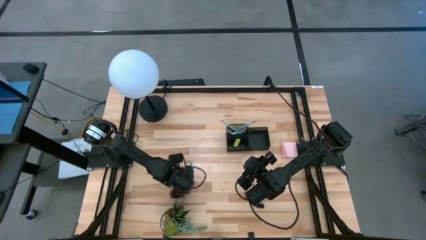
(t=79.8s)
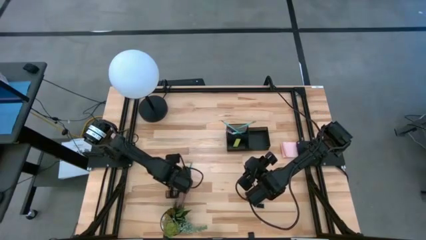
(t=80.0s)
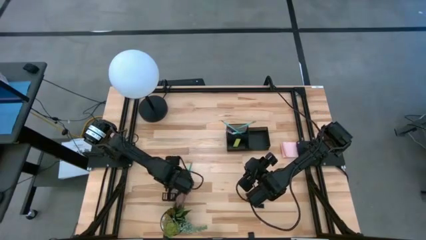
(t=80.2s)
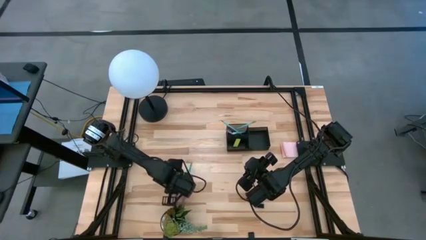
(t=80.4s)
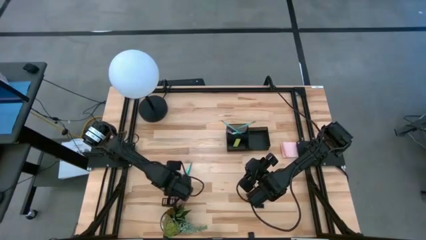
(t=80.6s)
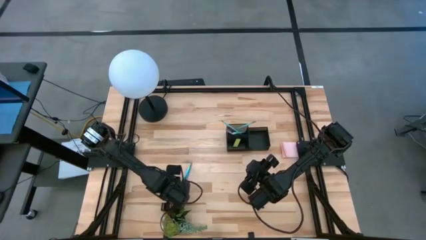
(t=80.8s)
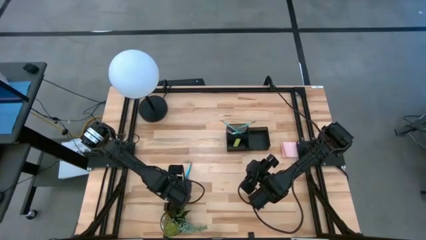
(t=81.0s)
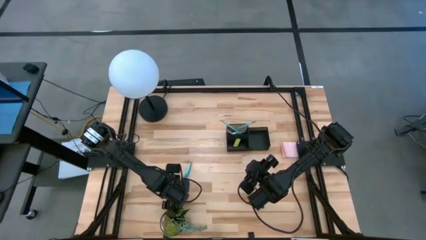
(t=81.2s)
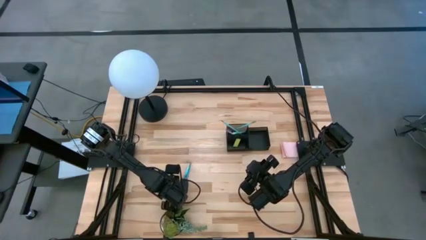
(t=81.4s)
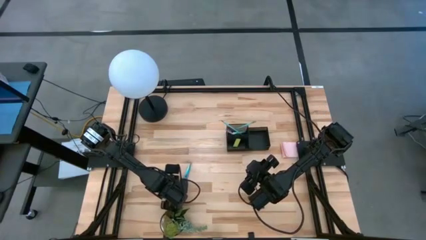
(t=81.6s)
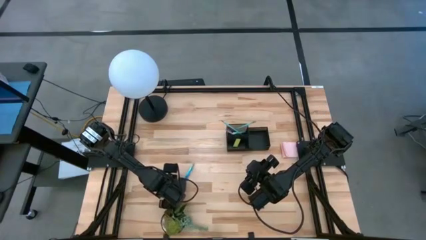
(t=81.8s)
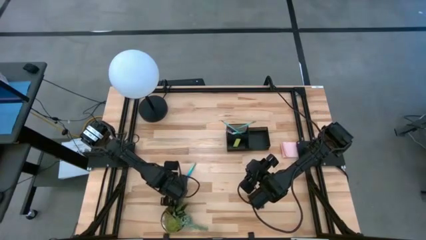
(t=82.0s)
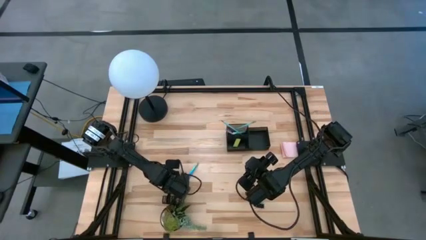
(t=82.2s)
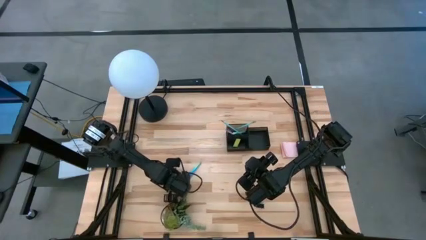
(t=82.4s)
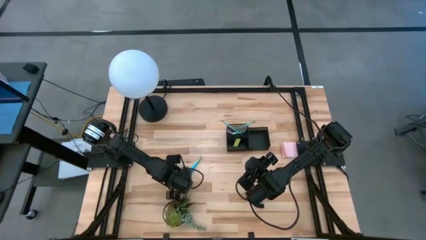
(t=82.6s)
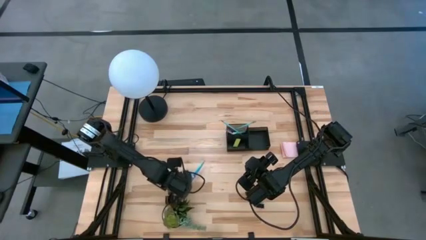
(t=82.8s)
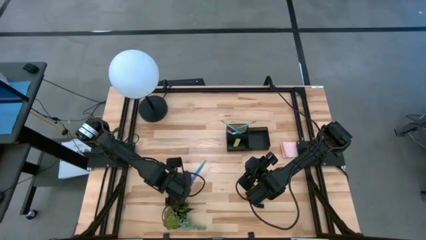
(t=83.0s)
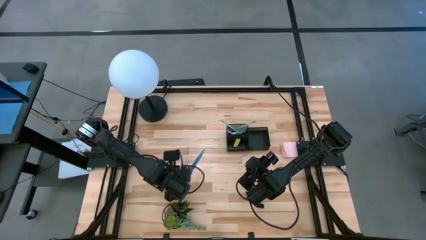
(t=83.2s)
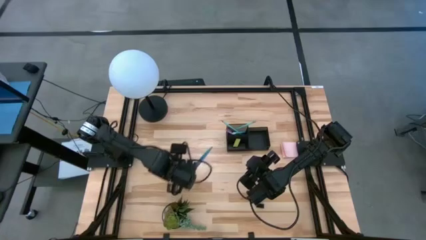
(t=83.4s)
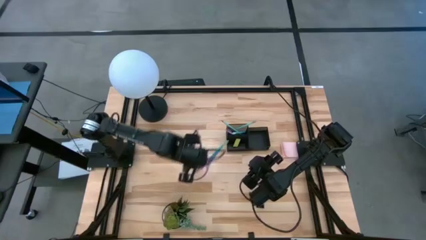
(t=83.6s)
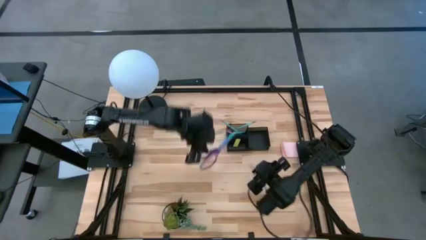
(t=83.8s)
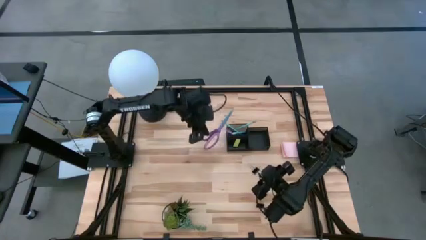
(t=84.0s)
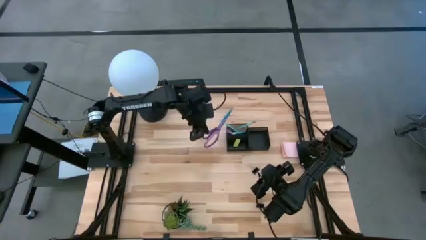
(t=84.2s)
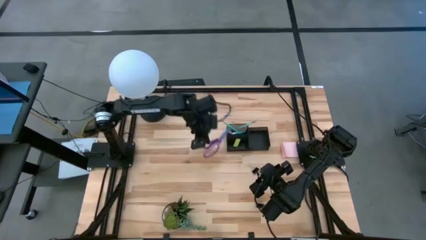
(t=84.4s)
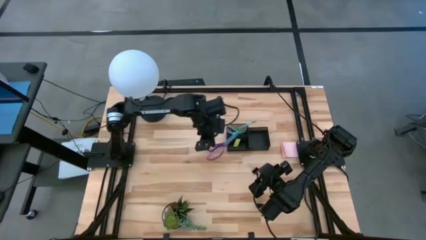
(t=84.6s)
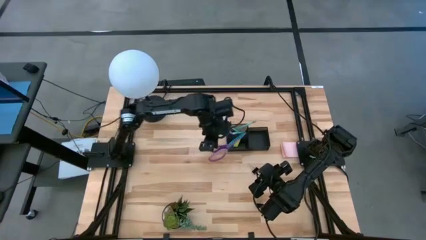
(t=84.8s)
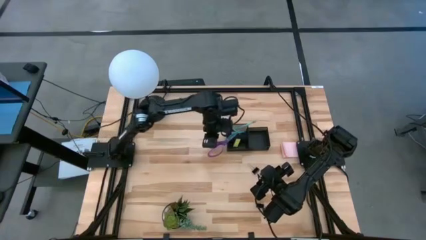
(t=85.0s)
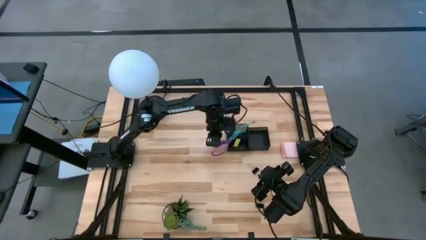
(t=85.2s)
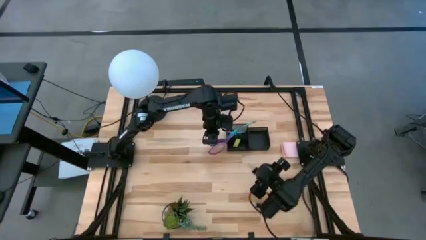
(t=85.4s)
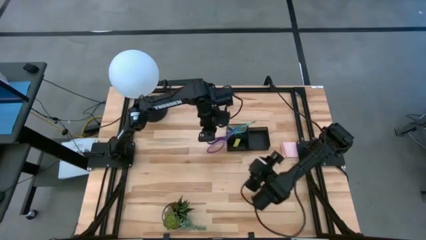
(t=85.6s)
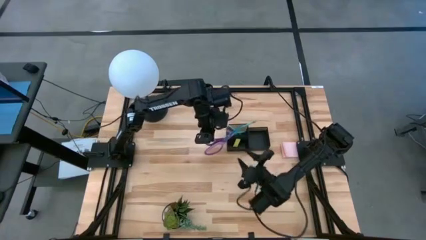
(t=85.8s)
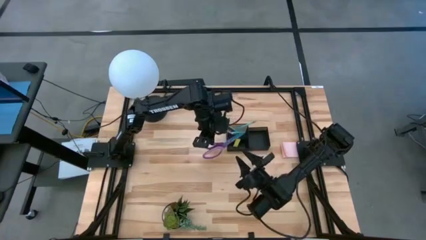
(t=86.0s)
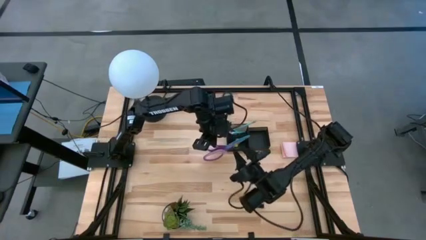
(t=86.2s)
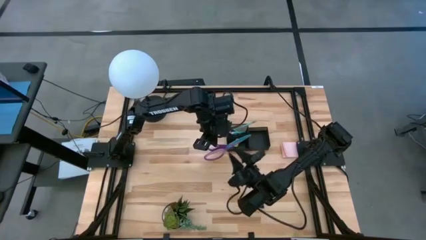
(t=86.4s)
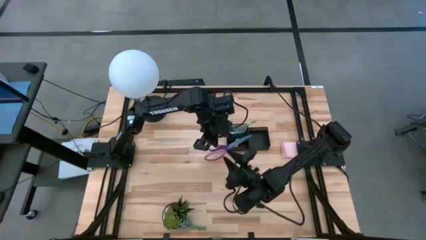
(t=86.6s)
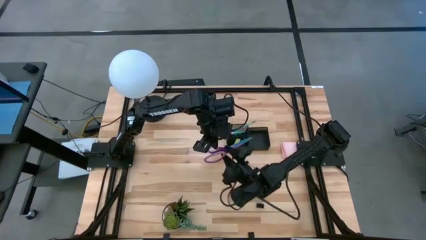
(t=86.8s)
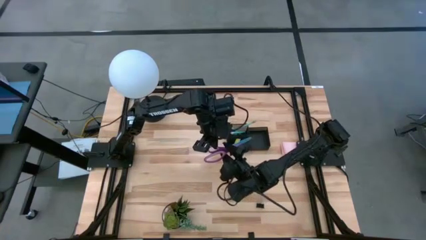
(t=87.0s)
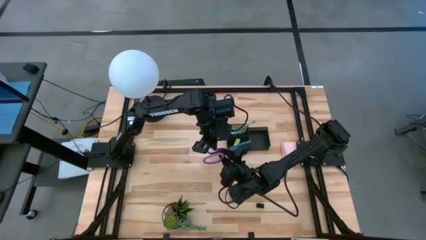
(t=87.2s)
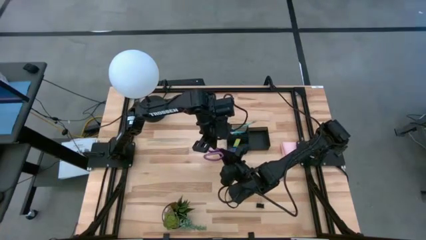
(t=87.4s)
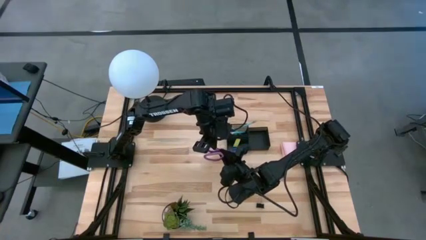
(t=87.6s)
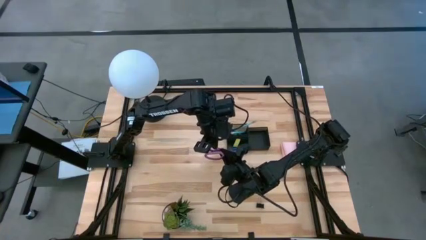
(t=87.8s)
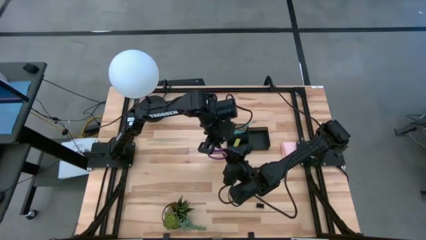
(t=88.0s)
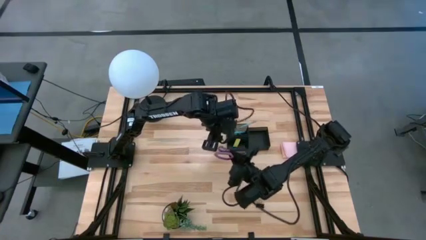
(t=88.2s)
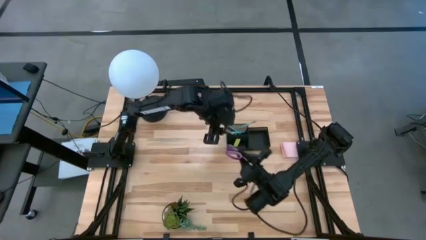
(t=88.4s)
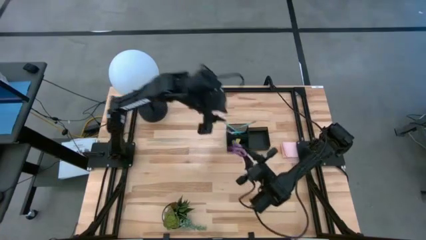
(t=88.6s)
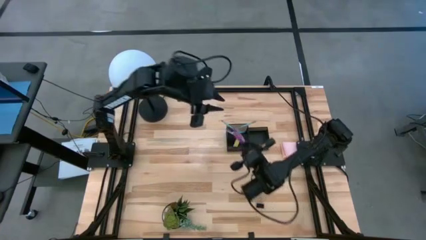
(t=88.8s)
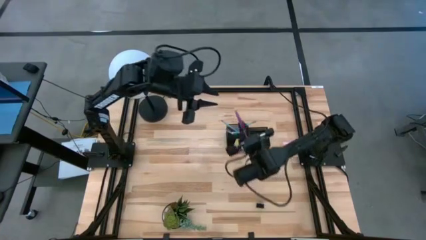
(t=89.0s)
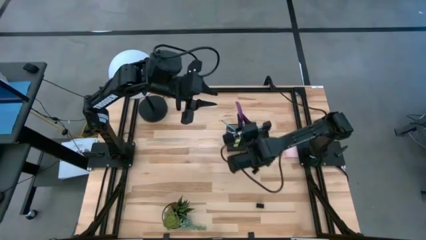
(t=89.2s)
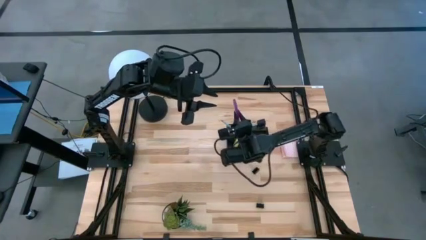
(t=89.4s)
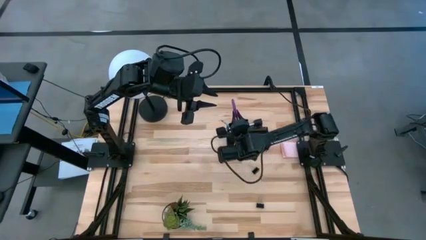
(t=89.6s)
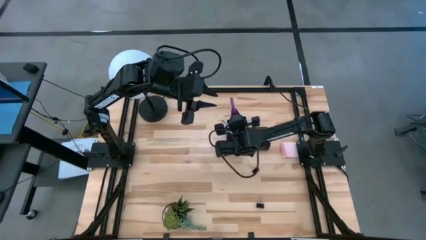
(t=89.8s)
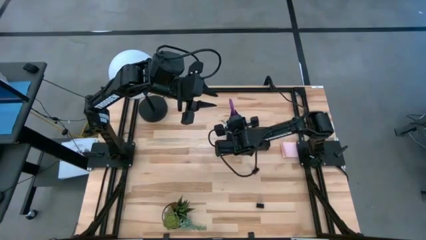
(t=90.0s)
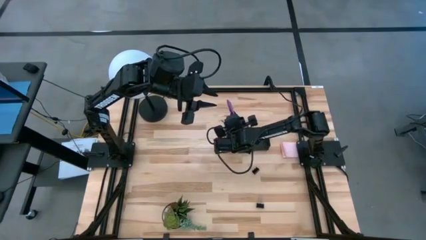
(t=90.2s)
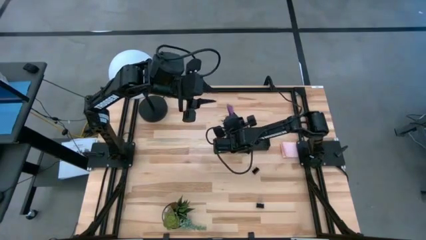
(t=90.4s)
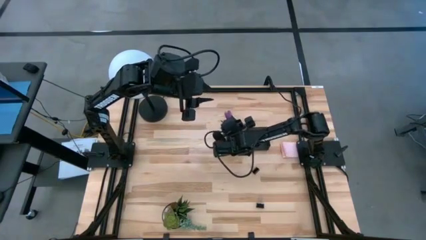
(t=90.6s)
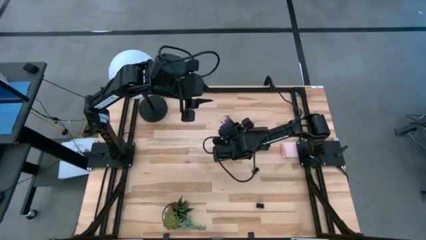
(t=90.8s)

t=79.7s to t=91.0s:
Task: Pick and place office supplies into organizer
Put the violet scissors into the black desk organizer
